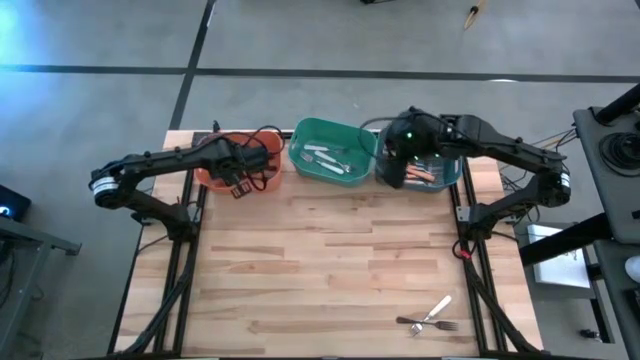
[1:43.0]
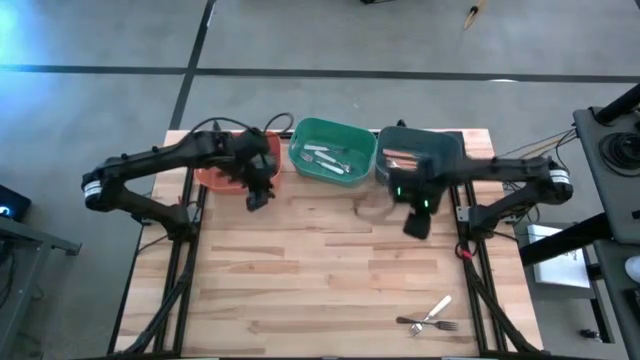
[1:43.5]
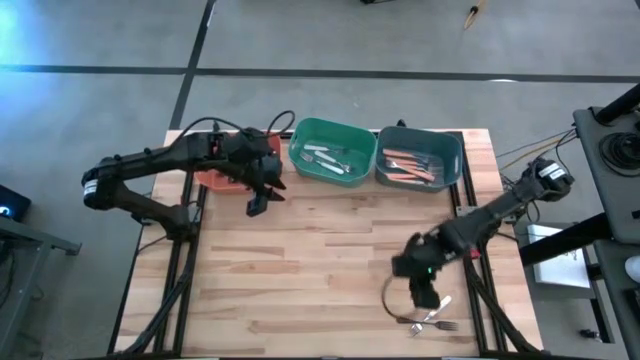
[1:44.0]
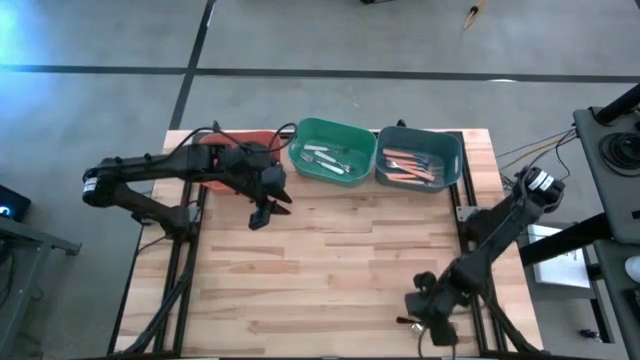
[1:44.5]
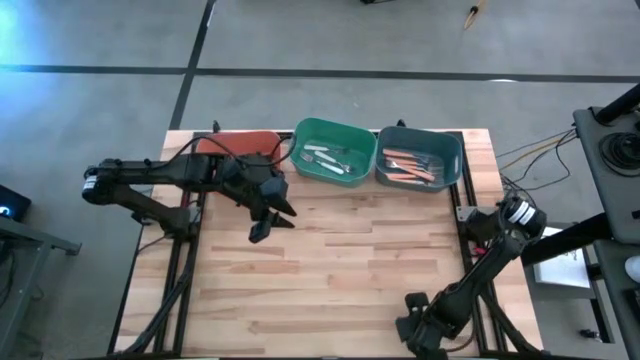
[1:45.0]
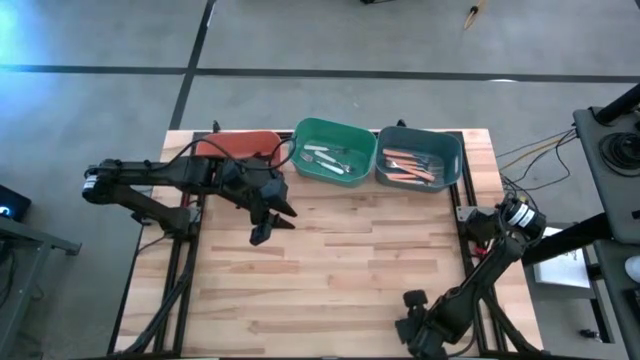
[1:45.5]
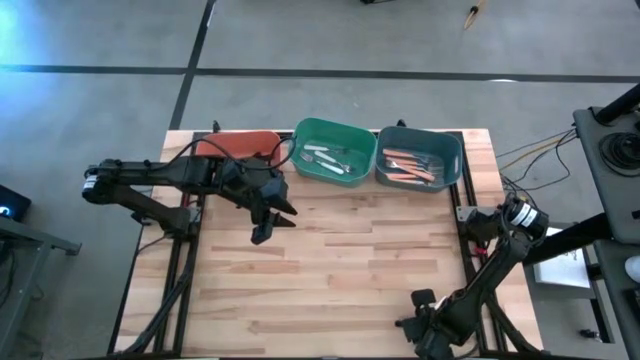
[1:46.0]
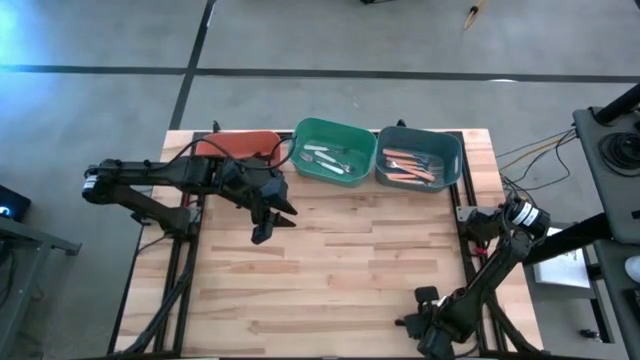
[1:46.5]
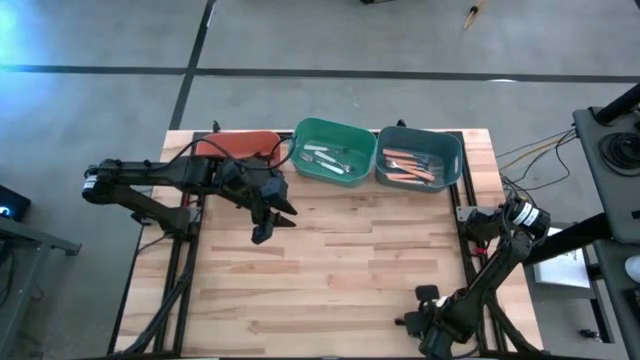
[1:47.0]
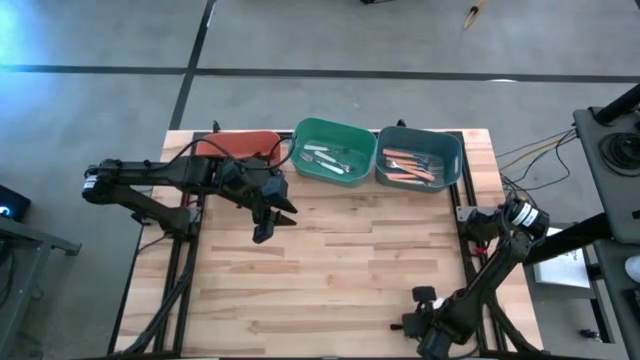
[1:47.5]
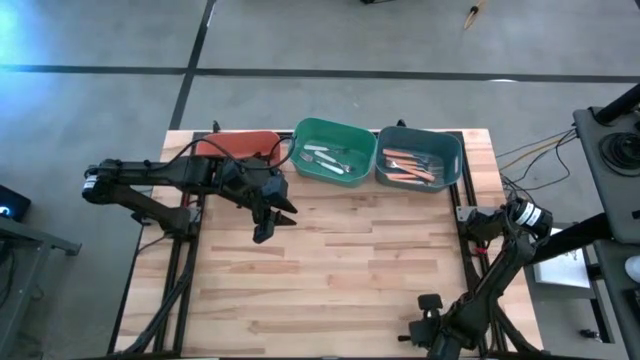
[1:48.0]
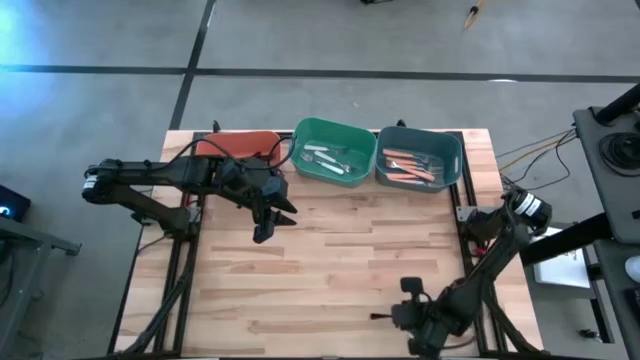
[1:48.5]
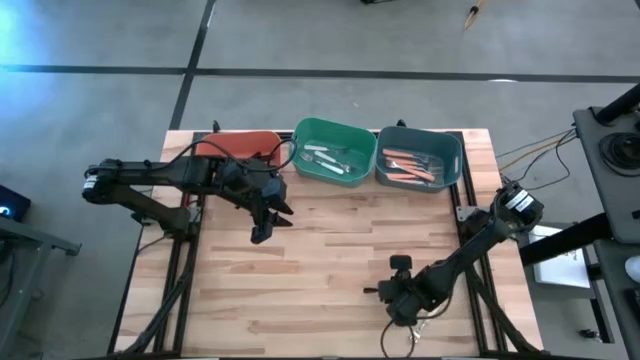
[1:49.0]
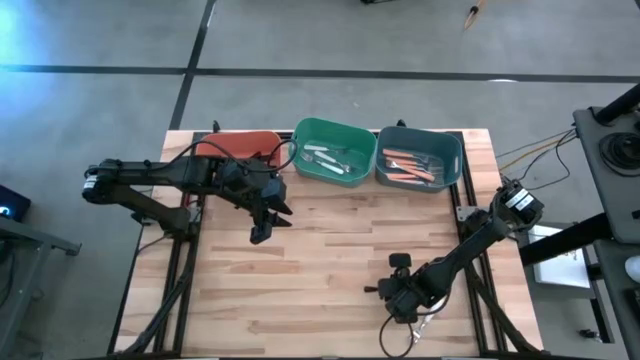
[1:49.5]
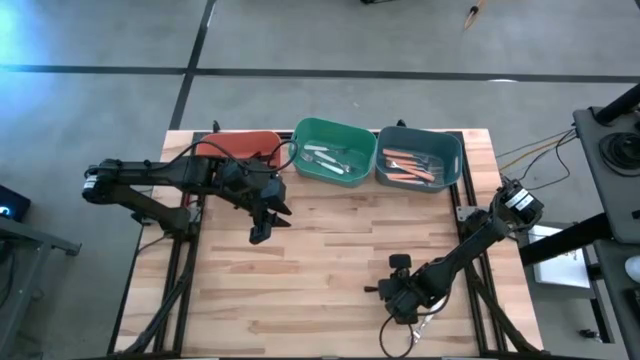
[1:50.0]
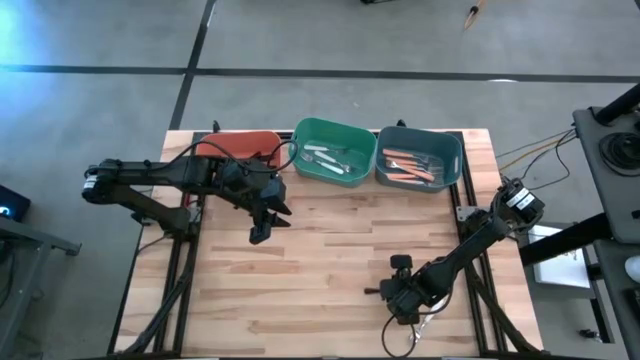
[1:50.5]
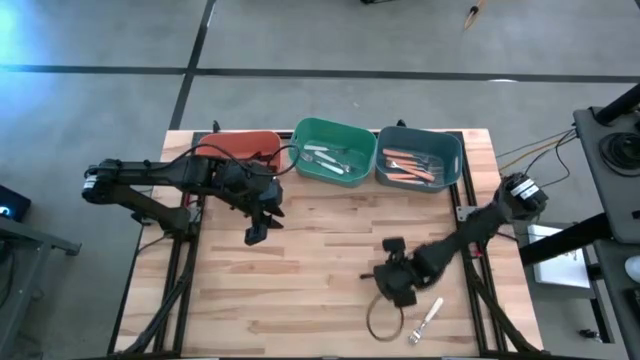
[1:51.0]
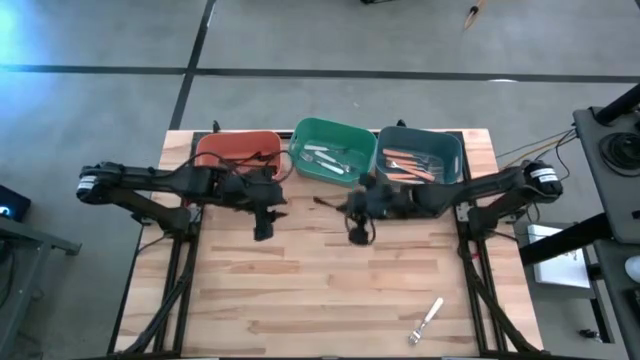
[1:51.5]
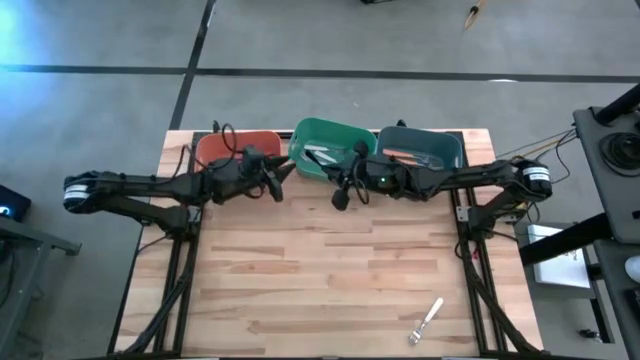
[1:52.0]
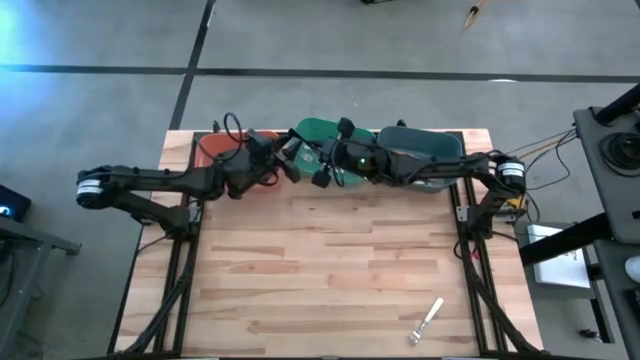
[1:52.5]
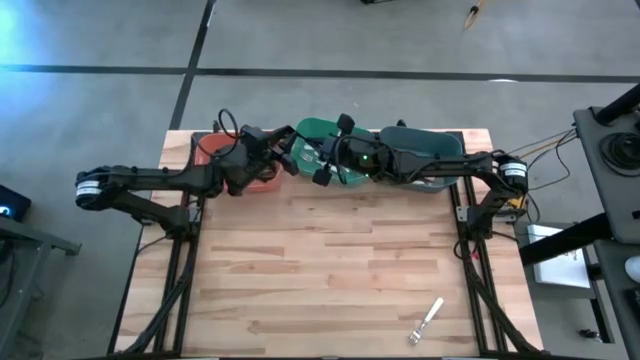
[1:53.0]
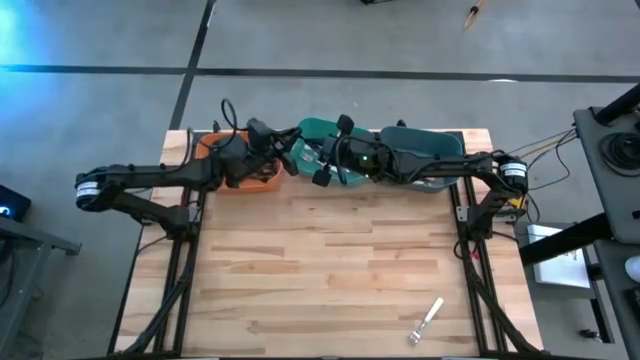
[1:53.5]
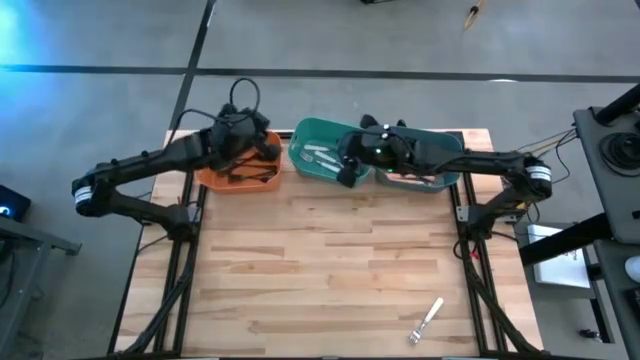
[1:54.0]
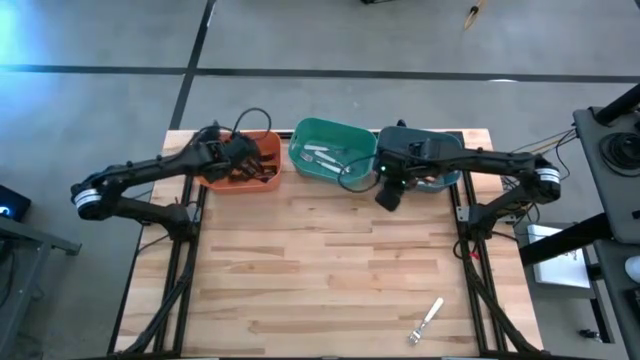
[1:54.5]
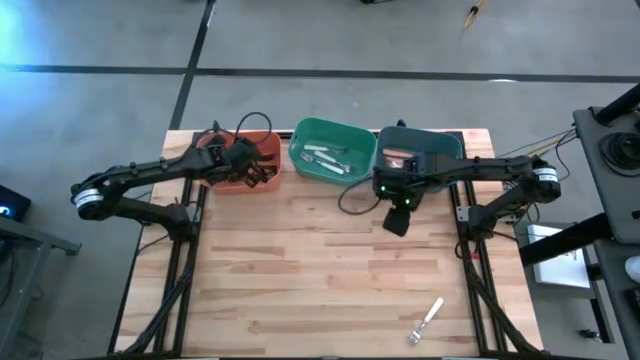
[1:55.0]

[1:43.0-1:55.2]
Task: Sort silverware by color (type)
Put the black fork into the orange bin

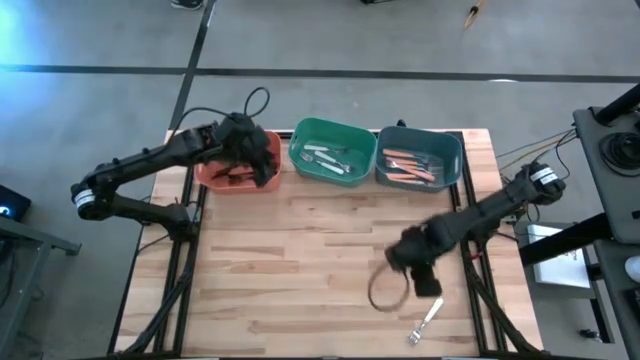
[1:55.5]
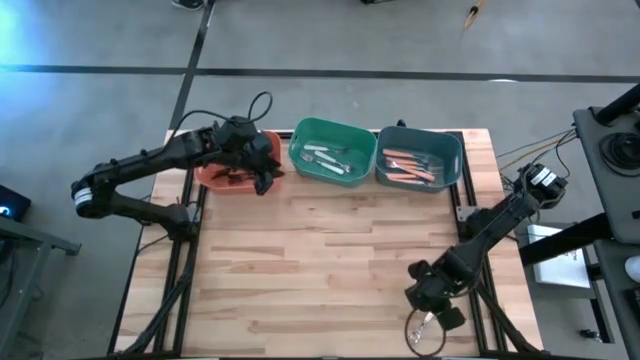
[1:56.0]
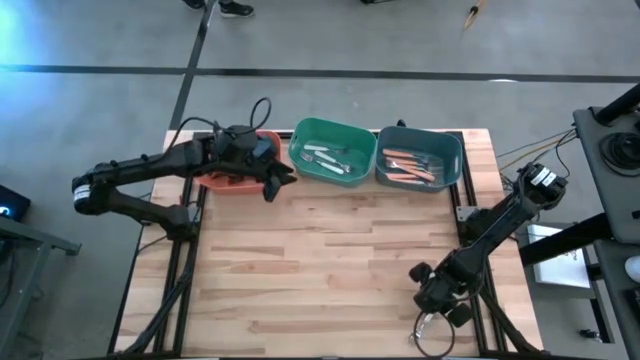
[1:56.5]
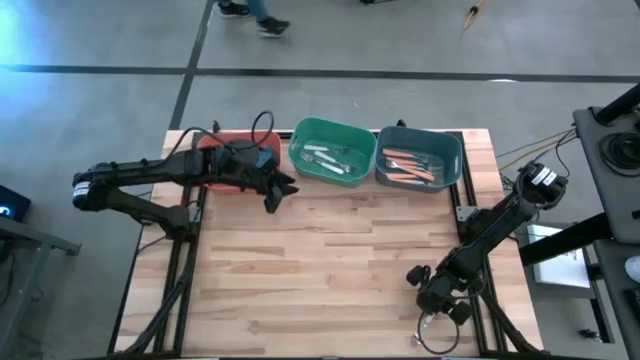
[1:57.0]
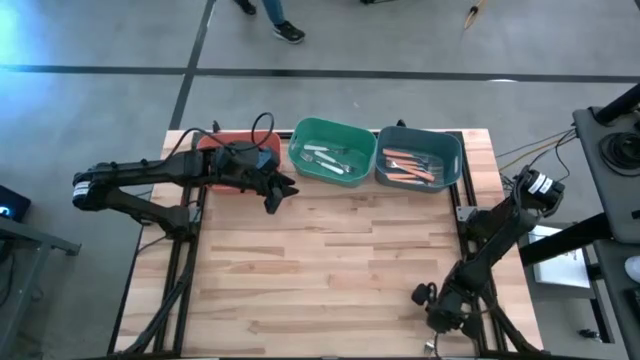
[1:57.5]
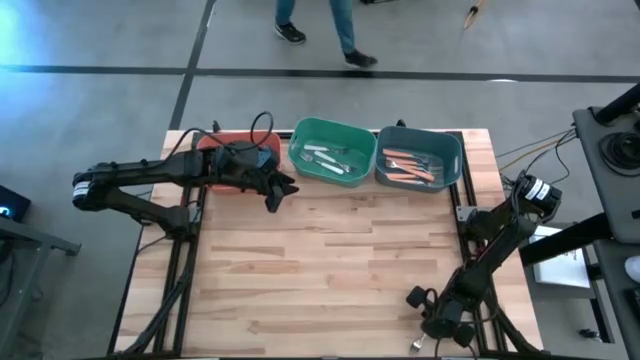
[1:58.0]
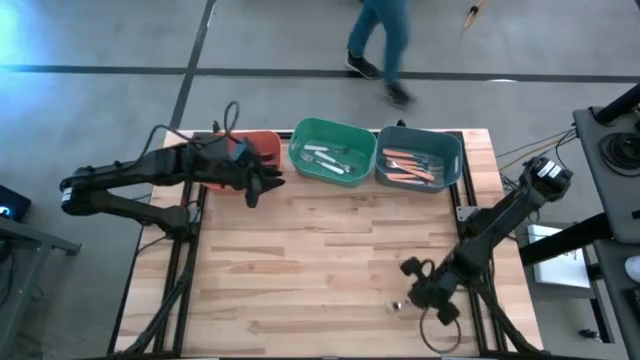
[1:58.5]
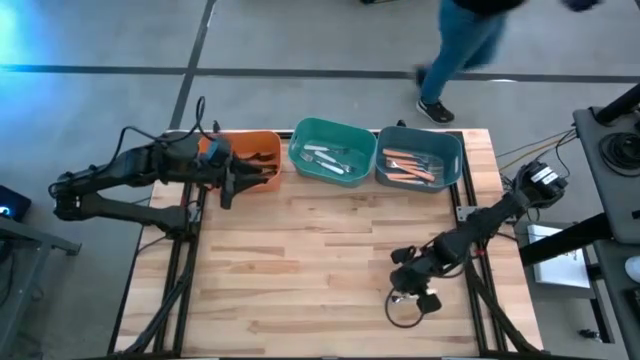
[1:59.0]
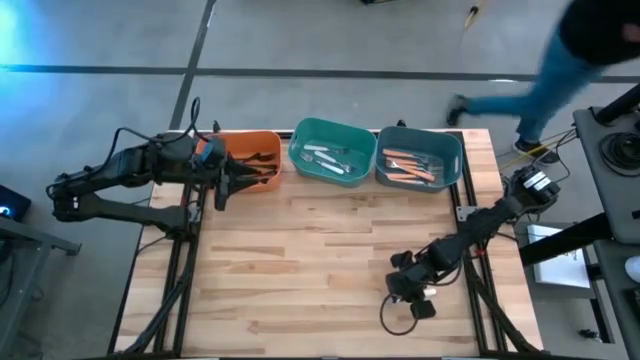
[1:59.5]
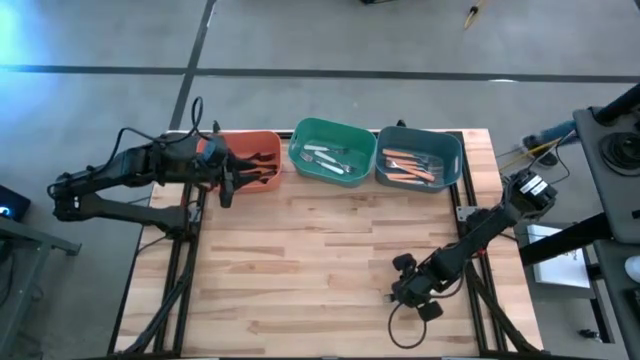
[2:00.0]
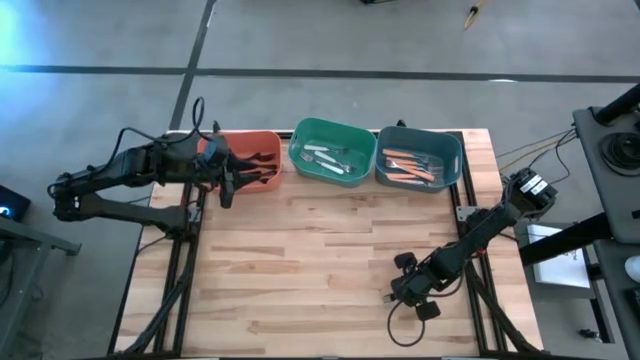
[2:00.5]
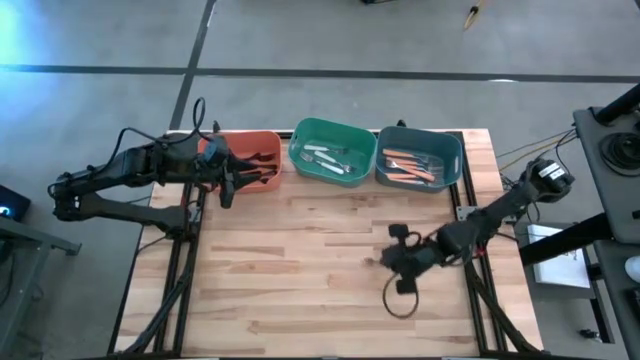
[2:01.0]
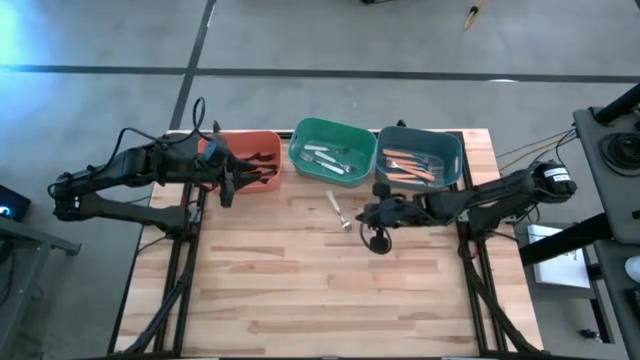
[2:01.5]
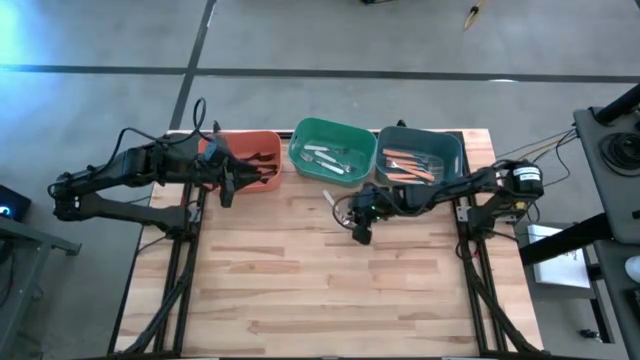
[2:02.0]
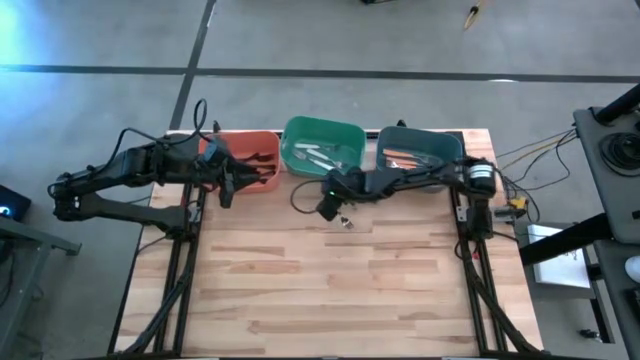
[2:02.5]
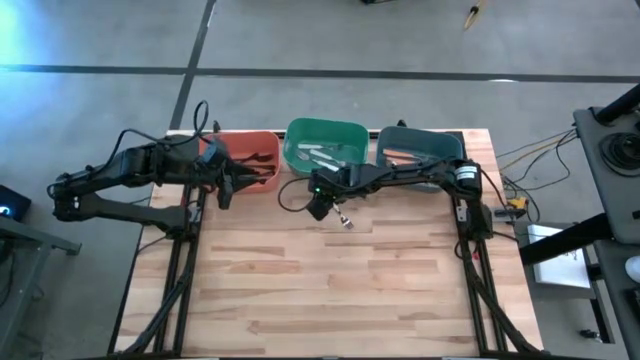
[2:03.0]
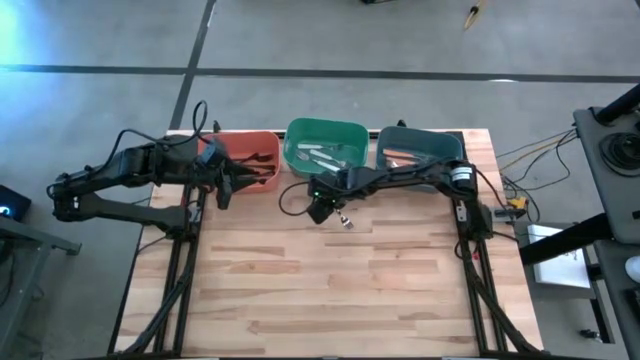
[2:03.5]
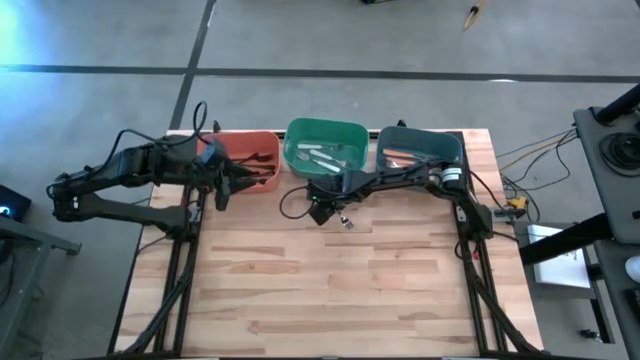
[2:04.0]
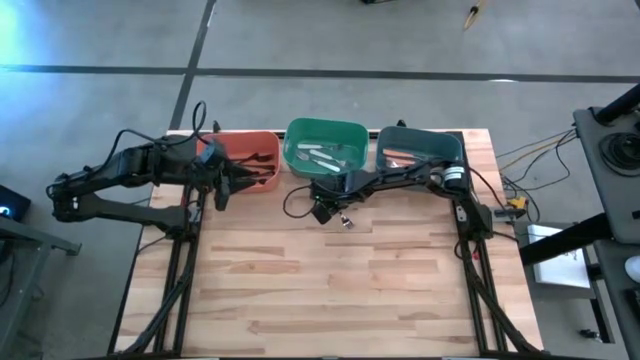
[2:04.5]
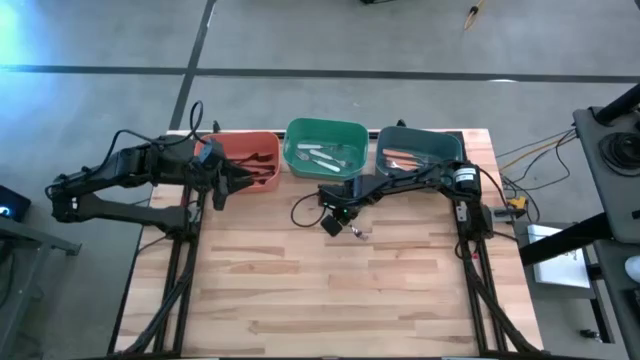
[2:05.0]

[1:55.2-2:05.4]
Put the white fork into the green bin
